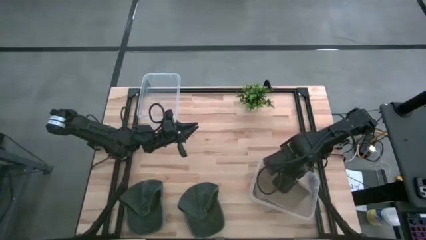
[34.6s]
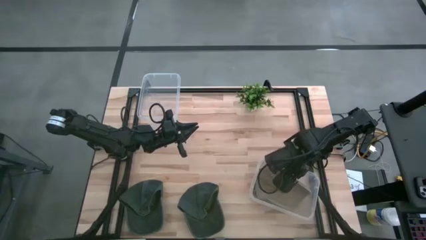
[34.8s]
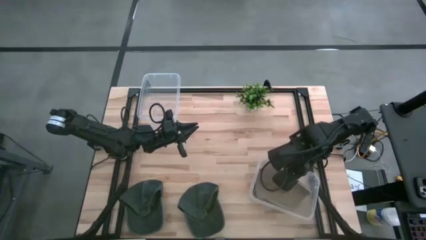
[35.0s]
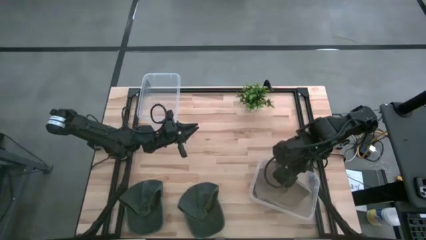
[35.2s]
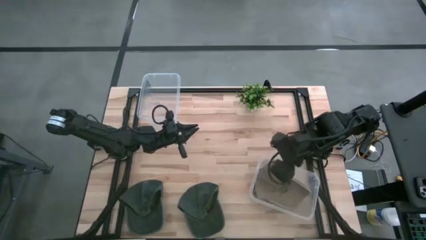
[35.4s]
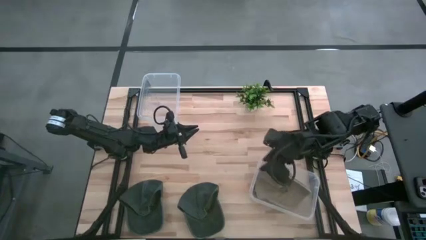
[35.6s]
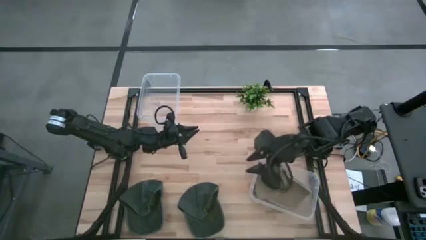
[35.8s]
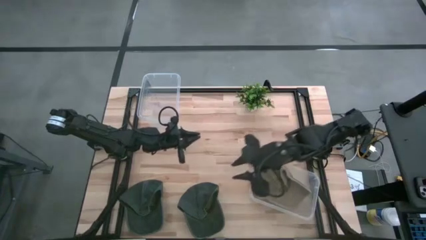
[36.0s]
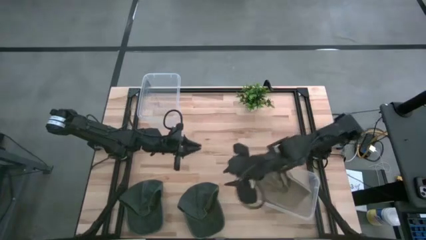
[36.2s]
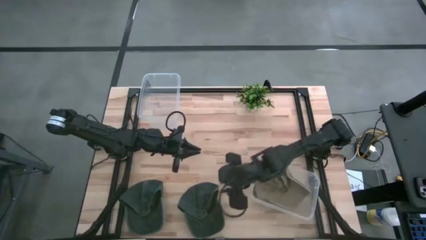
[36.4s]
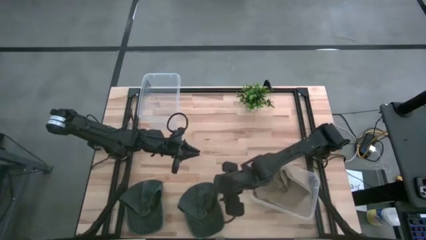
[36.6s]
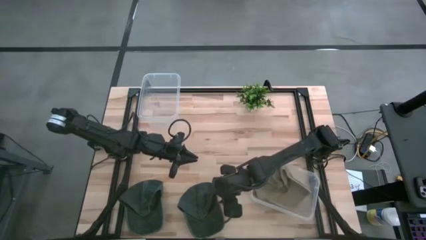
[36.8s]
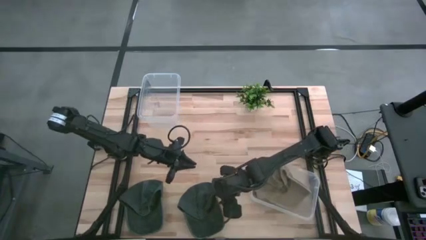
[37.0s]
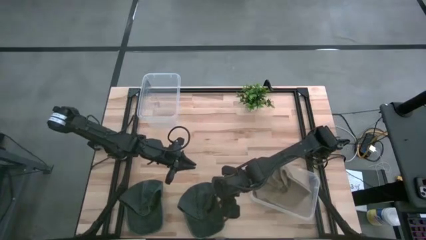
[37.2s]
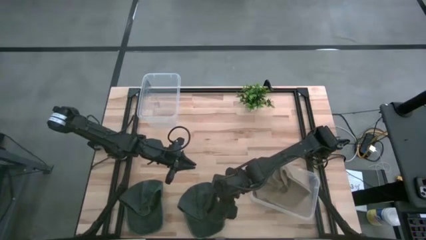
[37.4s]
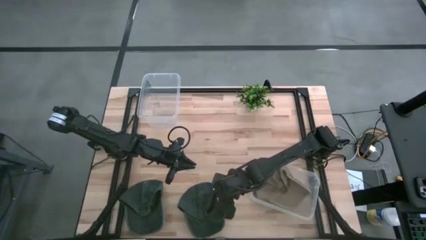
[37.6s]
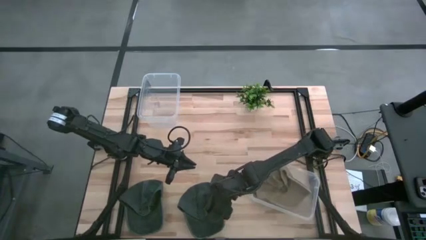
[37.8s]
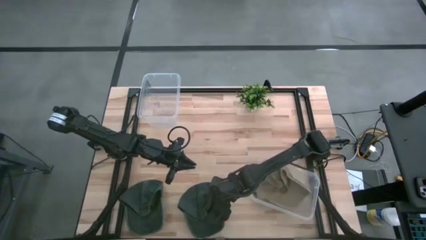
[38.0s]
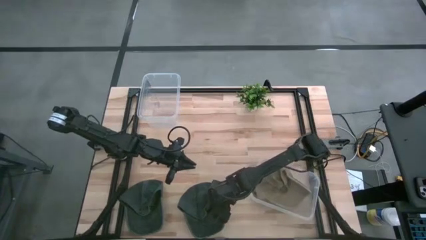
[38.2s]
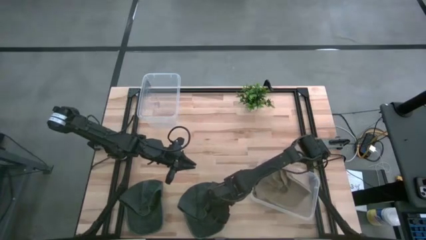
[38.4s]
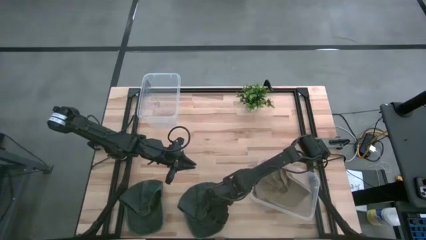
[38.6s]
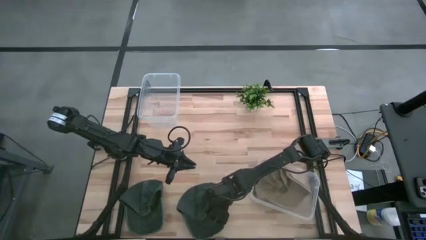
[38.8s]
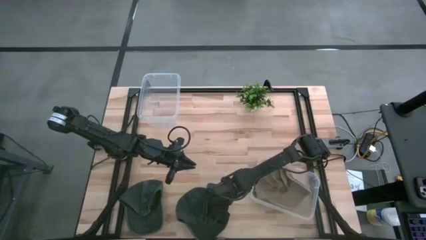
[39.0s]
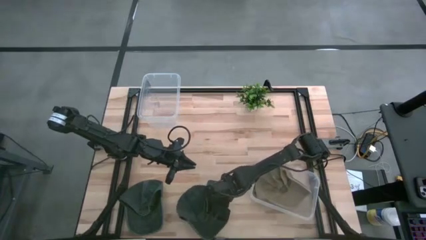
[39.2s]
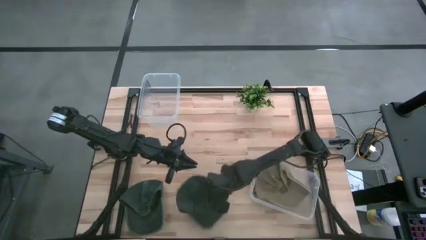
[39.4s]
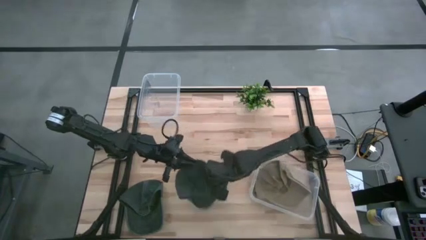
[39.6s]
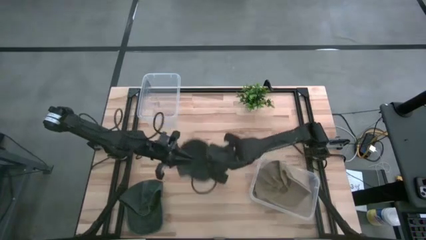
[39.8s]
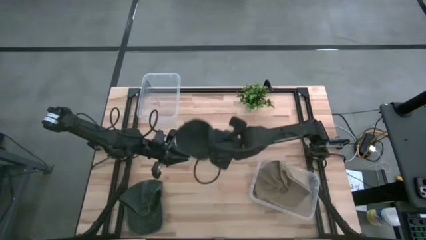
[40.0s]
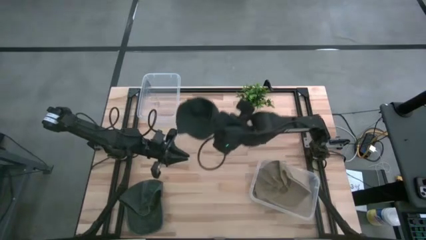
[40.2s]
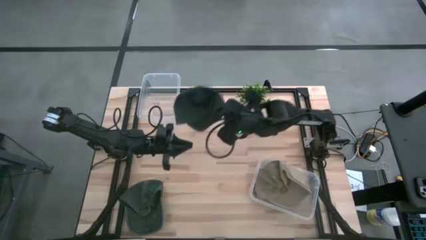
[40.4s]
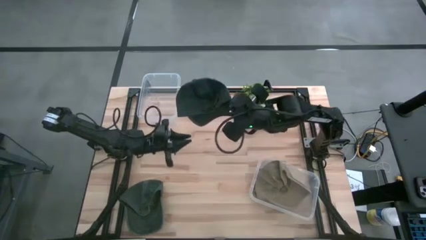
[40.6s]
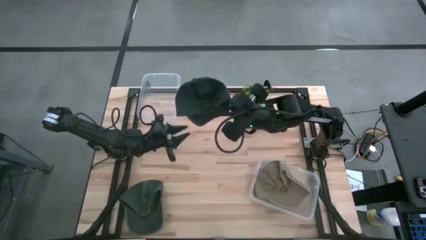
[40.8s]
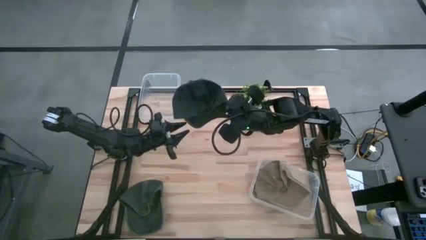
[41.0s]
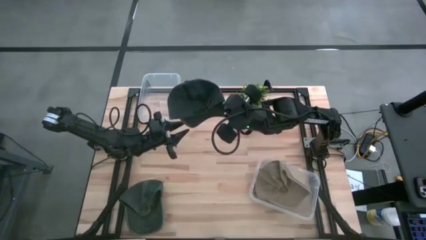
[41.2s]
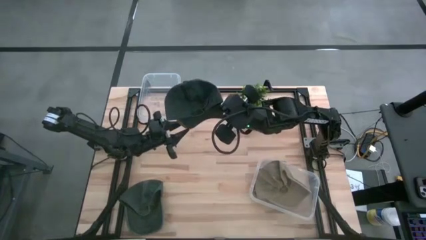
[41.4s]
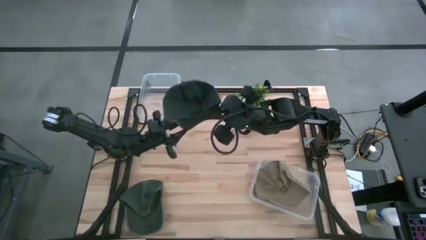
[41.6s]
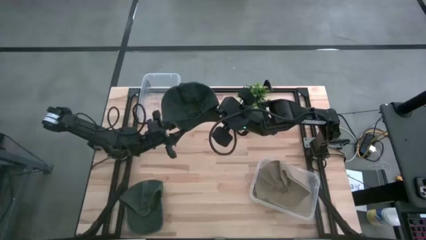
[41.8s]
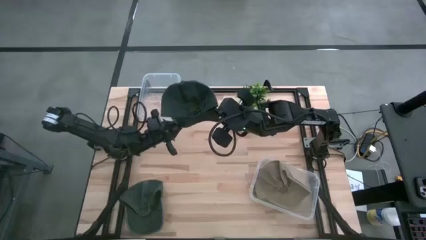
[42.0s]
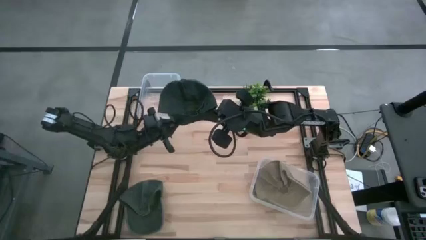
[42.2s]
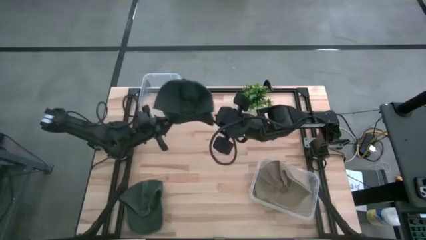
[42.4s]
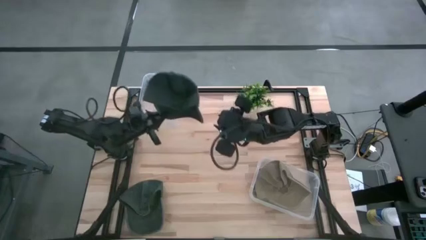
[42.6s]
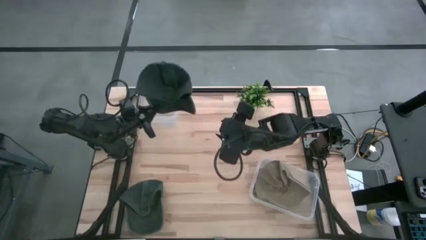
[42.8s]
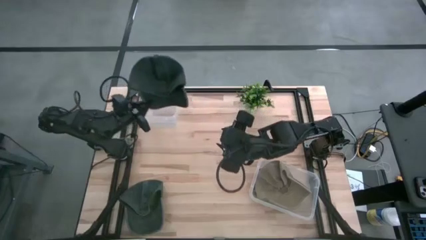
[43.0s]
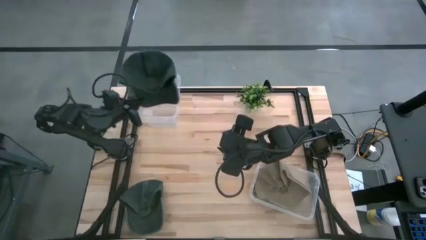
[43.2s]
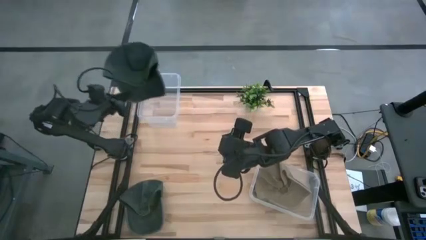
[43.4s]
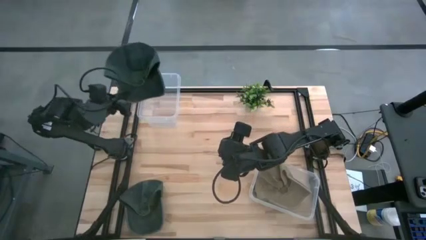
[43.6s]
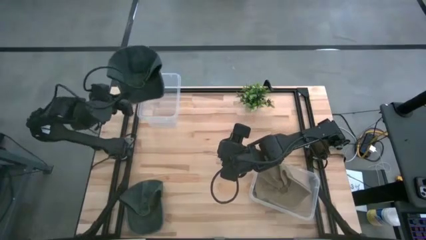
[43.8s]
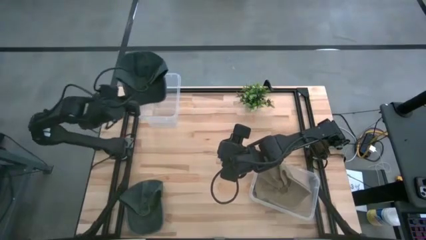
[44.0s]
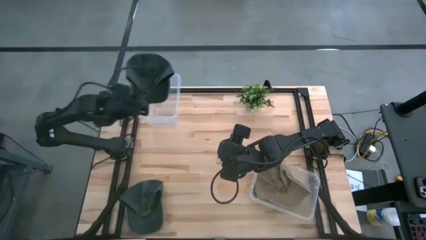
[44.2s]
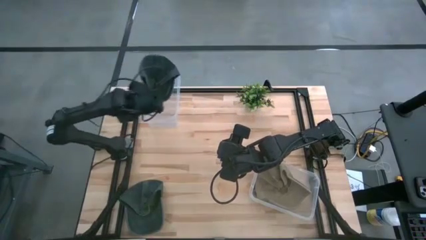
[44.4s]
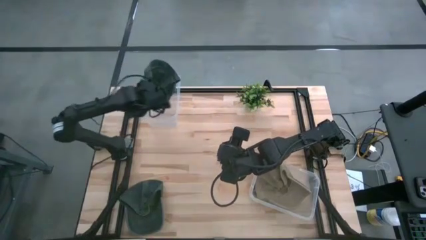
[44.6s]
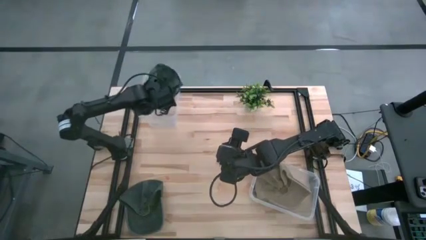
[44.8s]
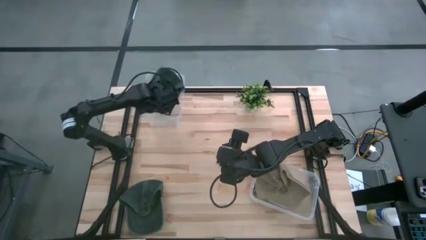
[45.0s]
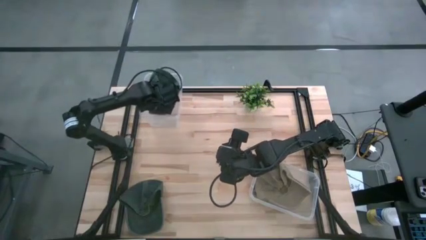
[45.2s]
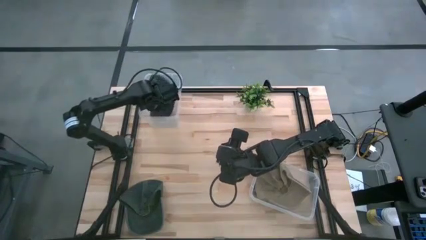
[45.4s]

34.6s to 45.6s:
Task: Pick & Place hat
Put the right black cap into the top transparent bin
